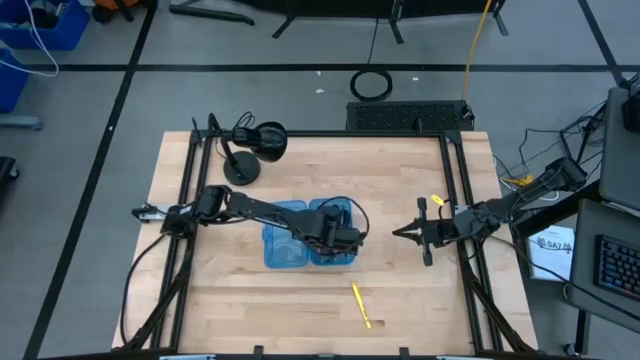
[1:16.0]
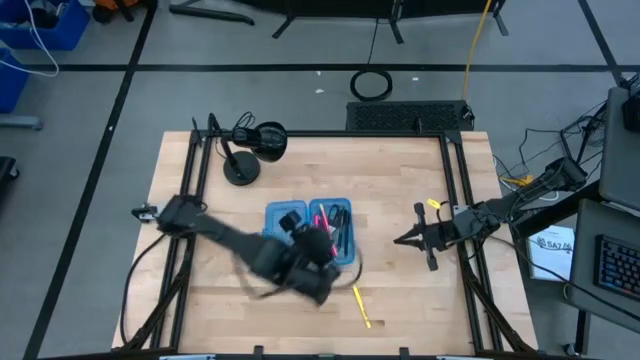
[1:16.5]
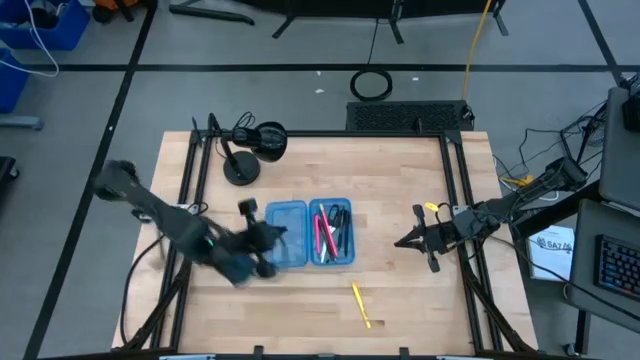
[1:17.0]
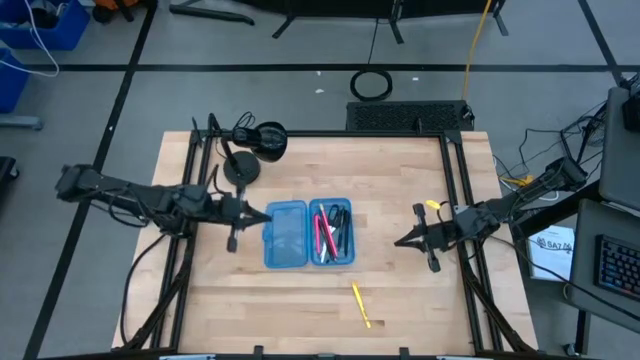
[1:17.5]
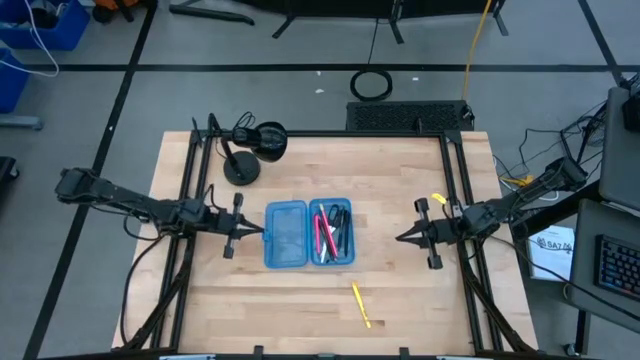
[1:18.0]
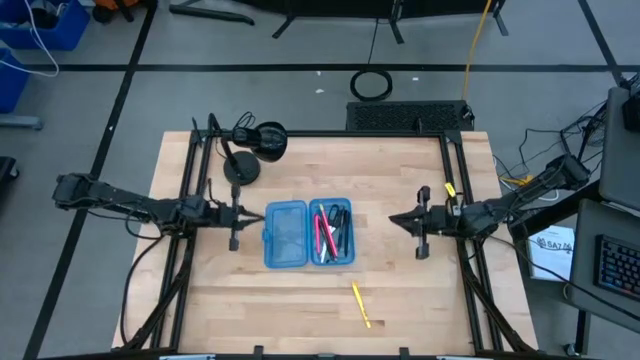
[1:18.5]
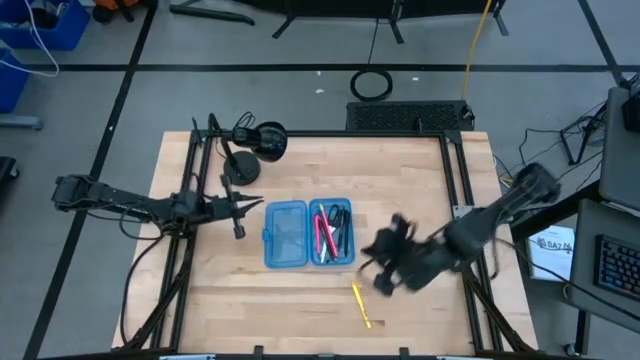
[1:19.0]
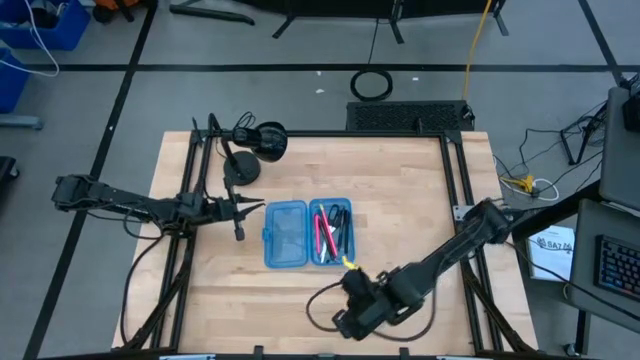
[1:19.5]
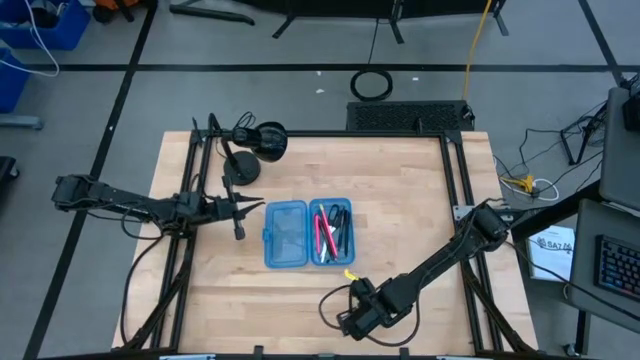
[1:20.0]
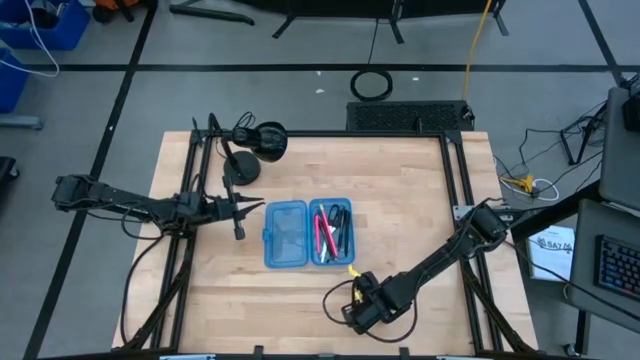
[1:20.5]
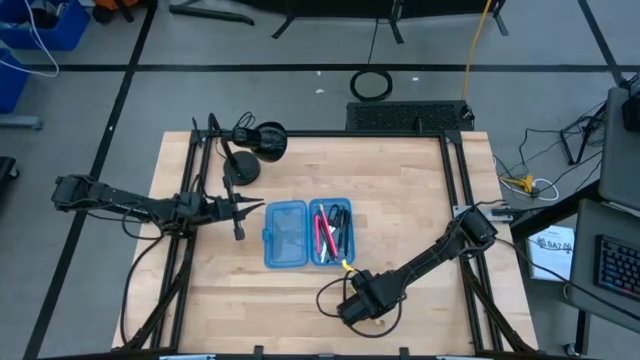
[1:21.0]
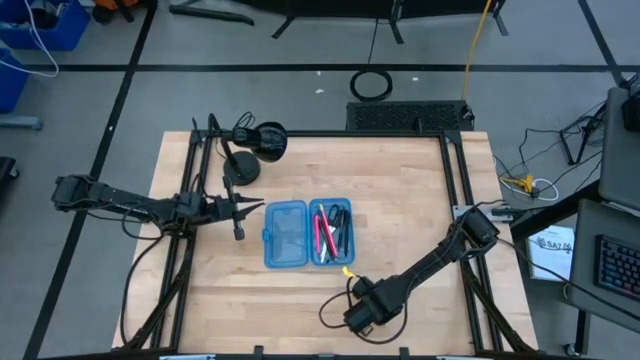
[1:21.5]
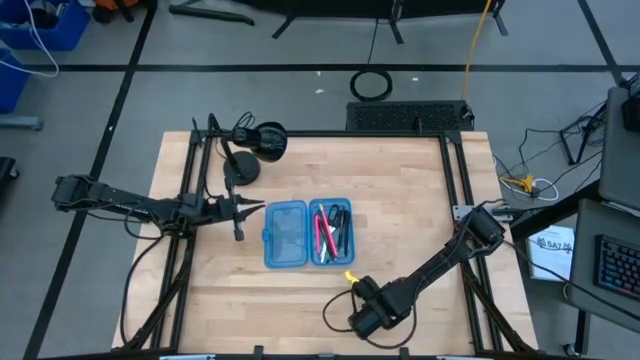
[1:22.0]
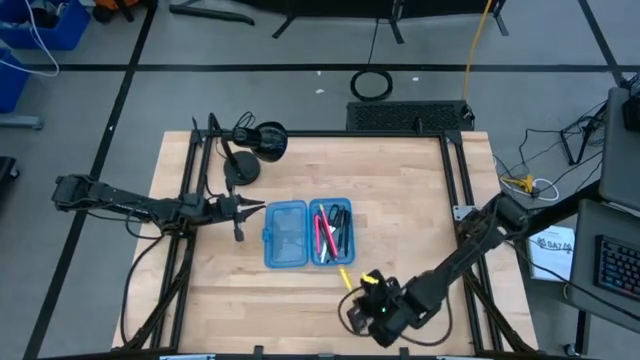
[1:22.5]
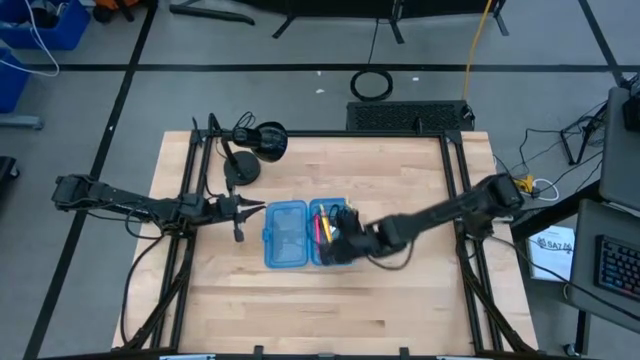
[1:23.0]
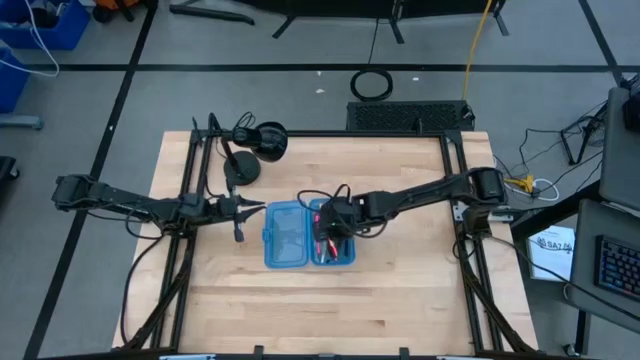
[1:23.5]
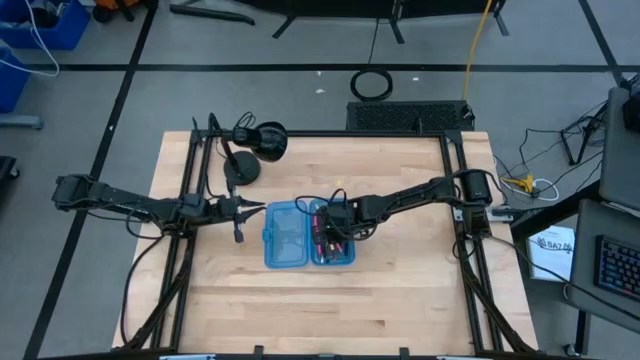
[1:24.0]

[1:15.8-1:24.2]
Task: Pick & place school supplies into a supply box
Put the yellow pen into the blue box

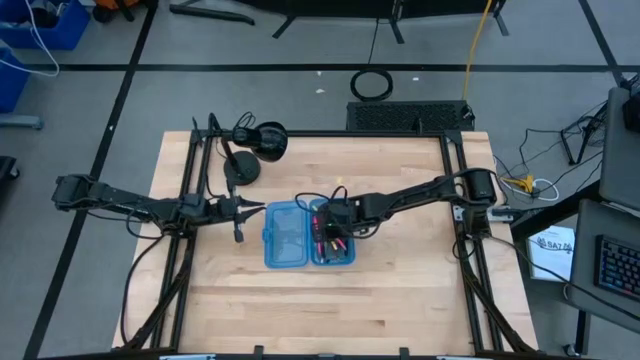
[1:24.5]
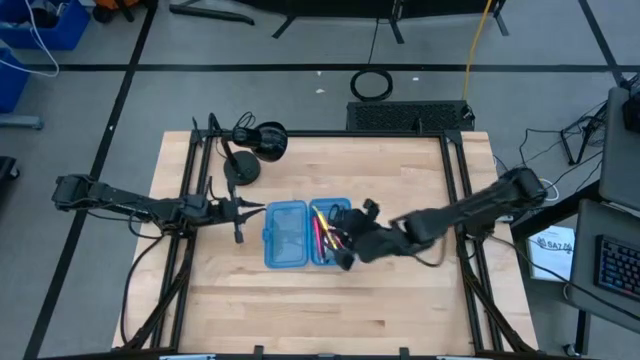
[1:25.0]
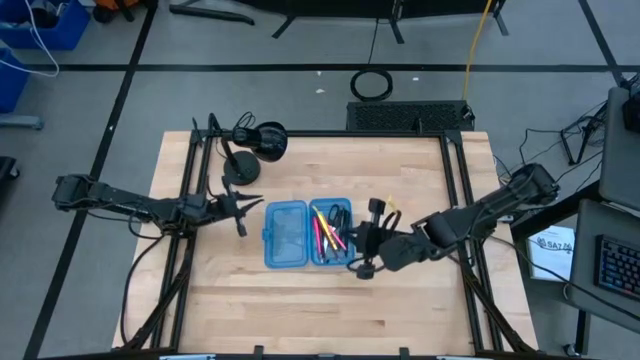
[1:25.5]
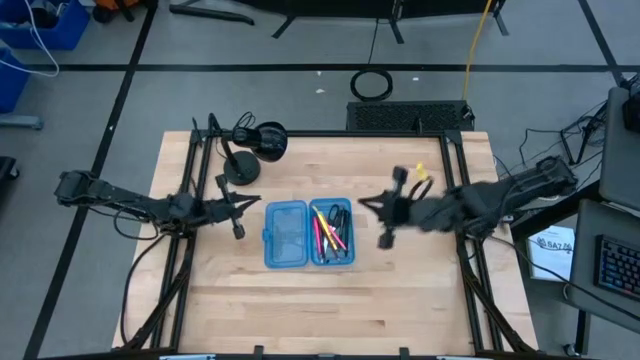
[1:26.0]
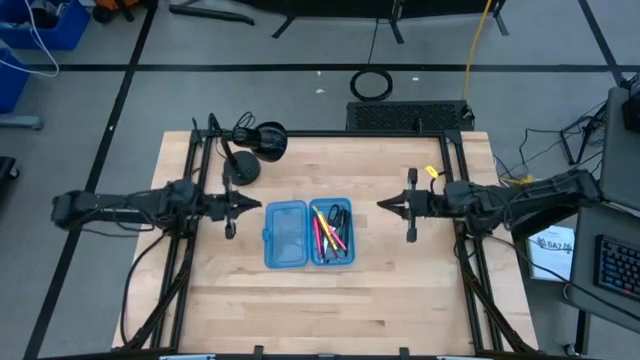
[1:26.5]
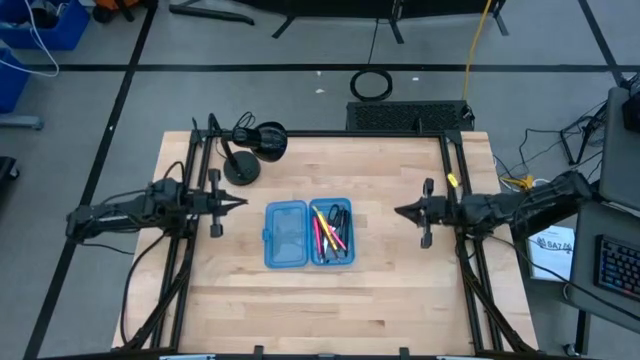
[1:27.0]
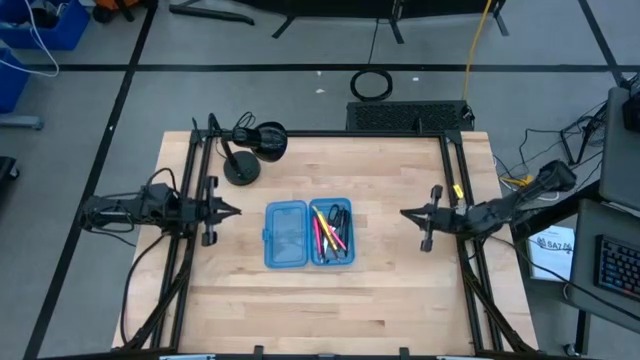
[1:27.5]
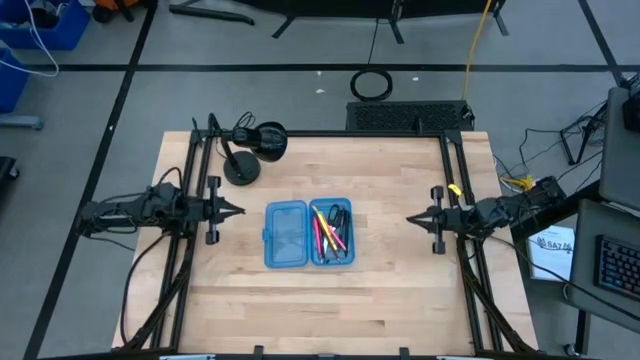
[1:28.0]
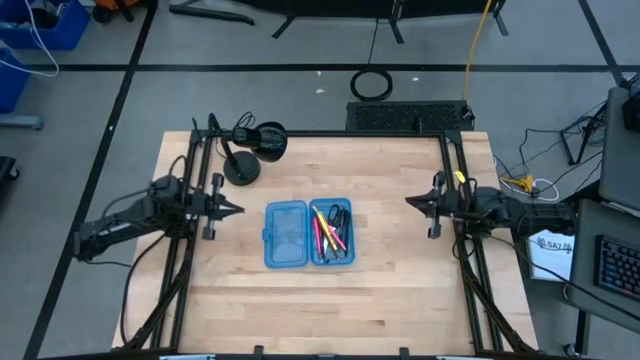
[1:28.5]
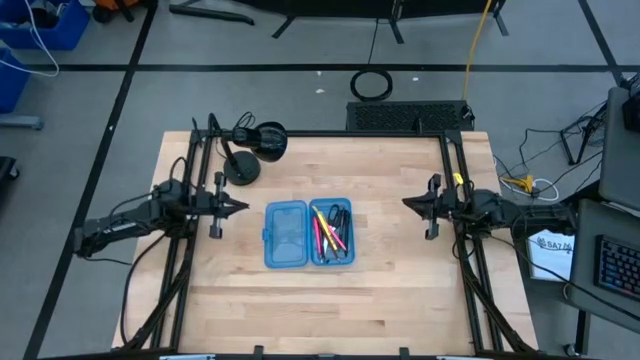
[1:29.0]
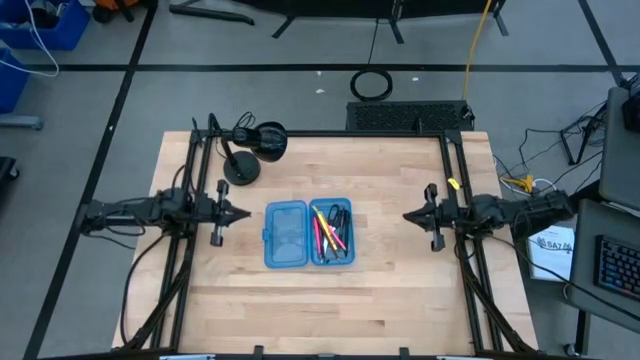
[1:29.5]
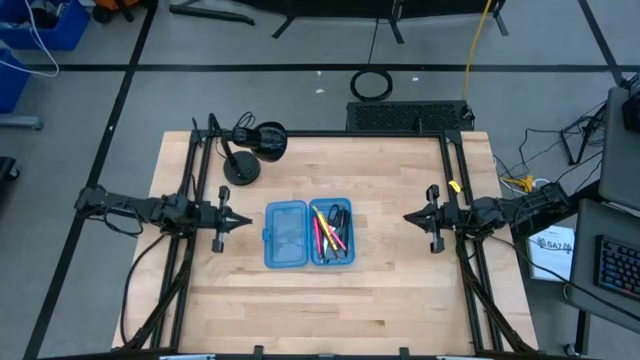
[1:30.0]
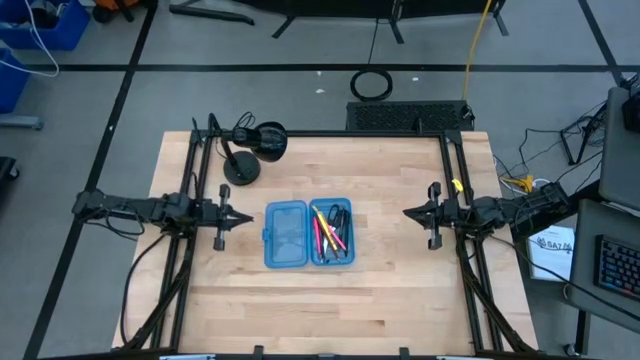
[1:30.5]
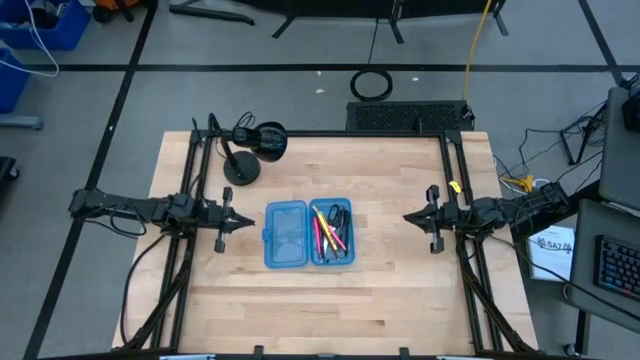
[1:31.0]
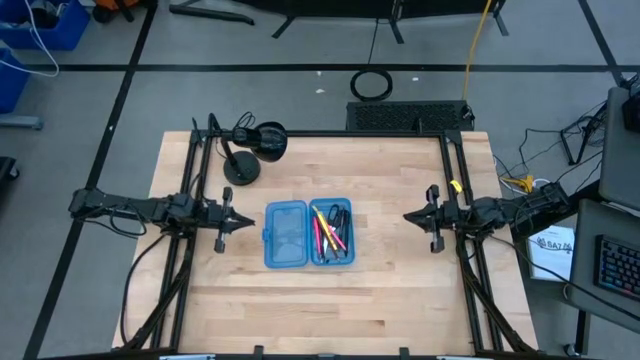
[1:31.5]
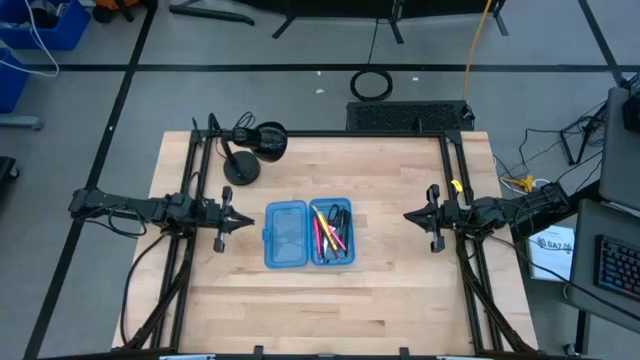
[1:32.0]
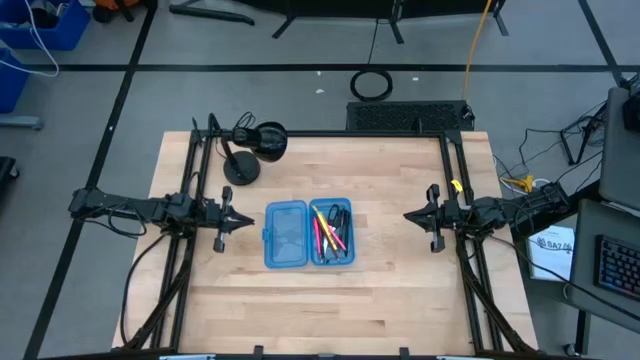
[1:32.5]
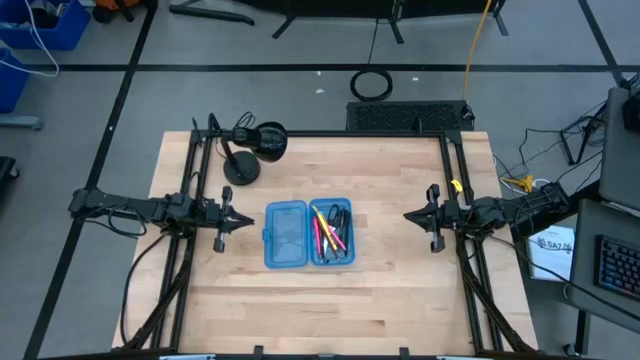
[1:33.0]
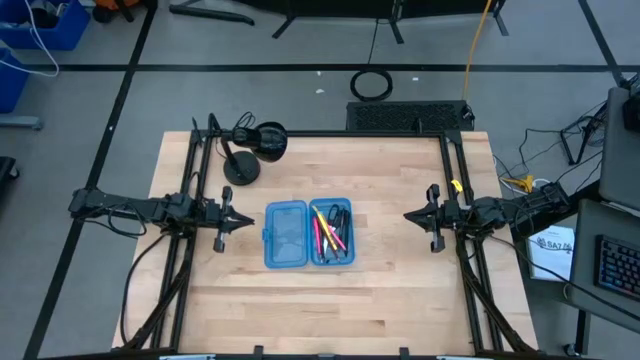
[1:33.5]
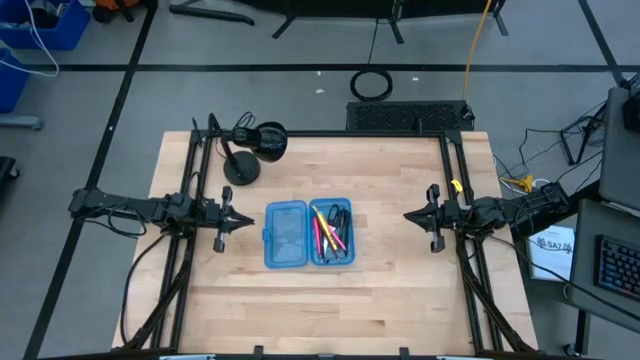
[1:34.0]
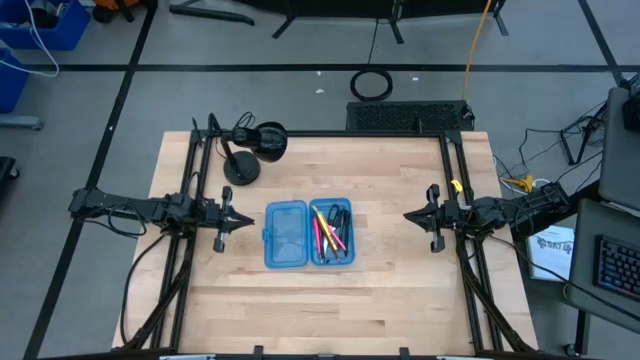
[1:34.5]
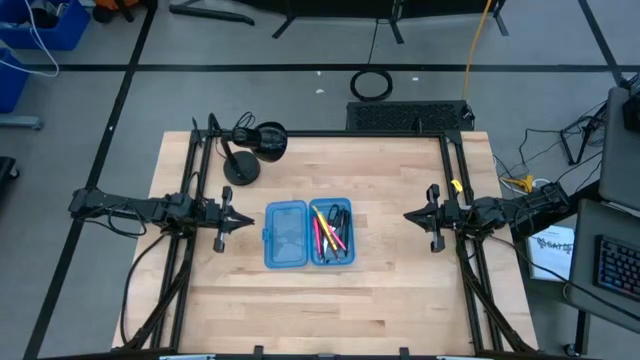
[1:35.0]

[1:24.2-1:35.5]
Return to Home Position

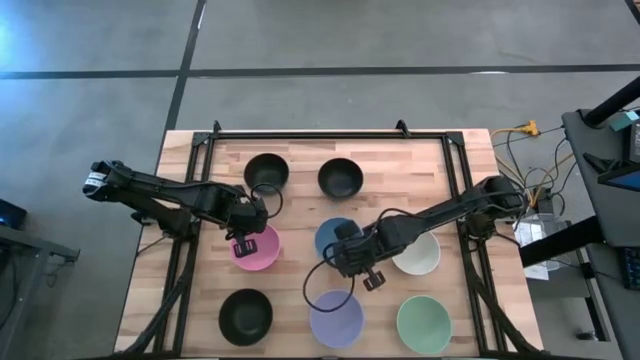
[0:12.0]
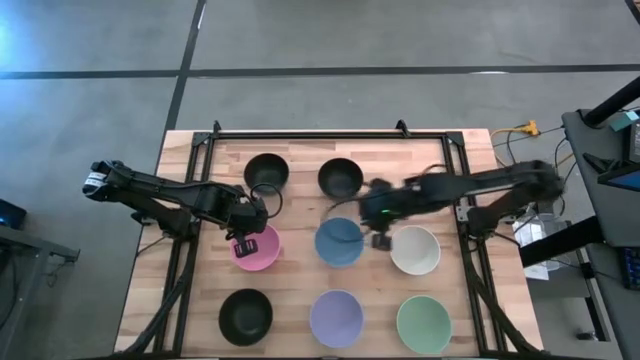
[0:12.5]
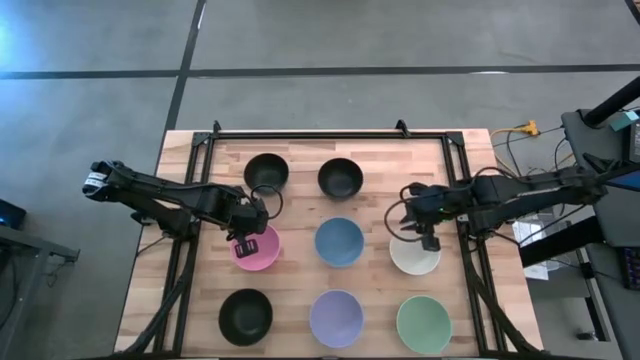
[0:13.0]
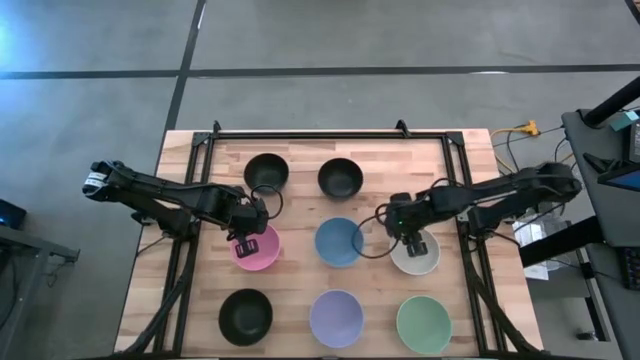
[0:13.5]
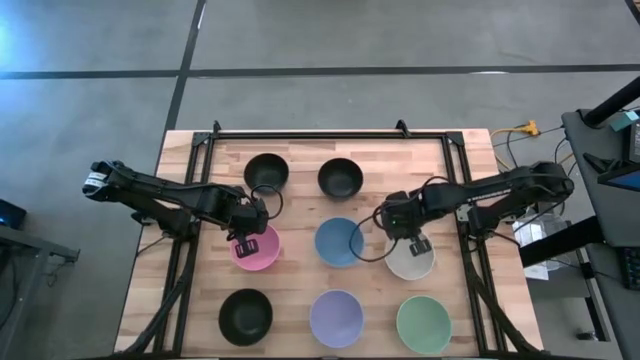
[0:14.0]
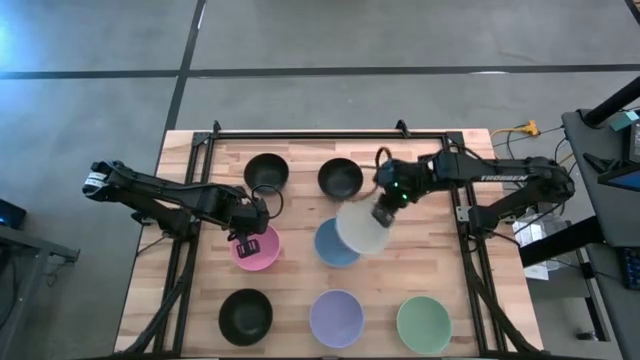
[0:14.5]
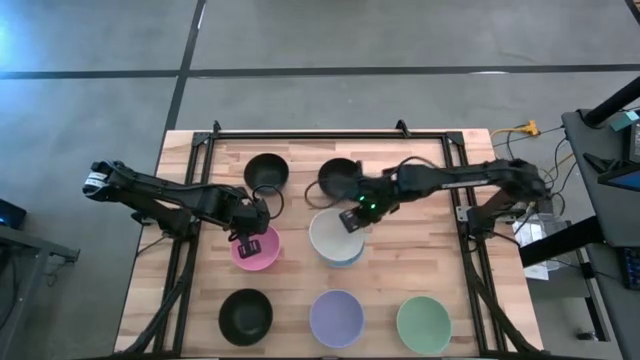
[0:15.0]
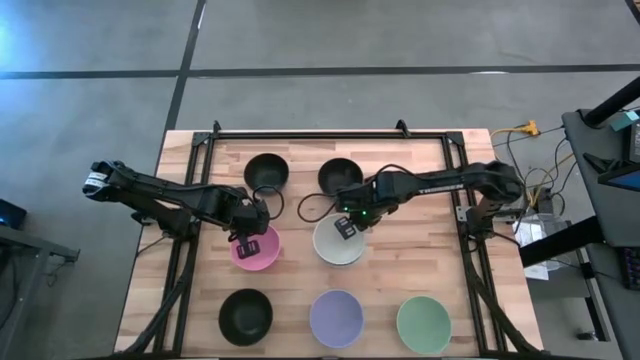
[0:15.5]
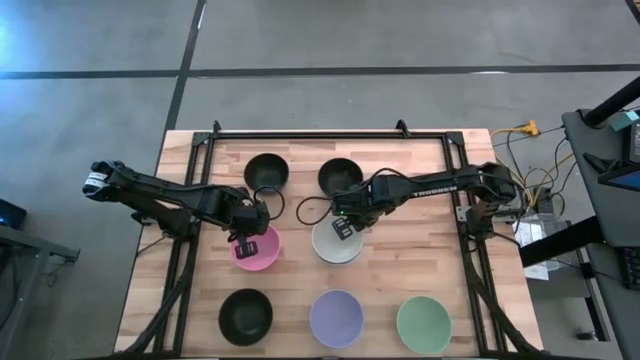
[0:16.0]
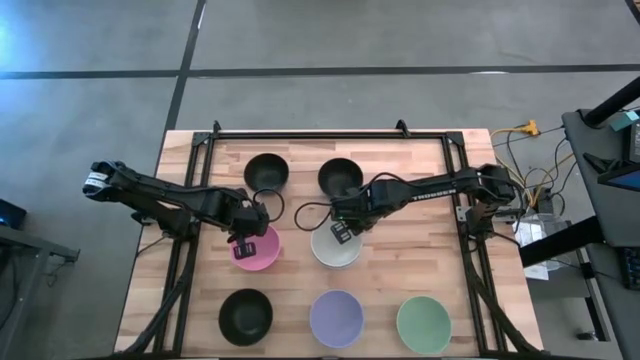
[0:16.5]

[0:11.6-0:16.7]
Task: Nest bowls inside each other
Stack the white bowl on top of the blue bowl
